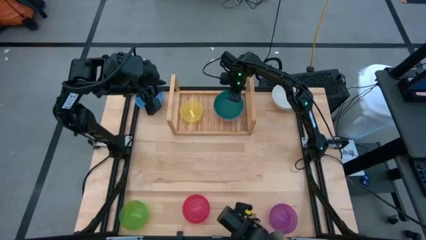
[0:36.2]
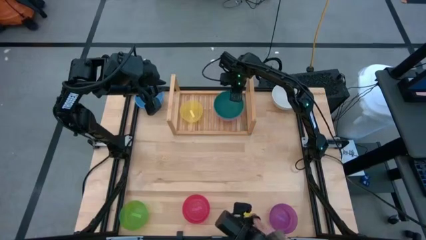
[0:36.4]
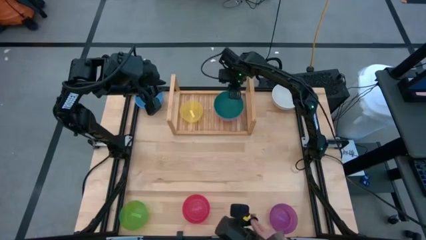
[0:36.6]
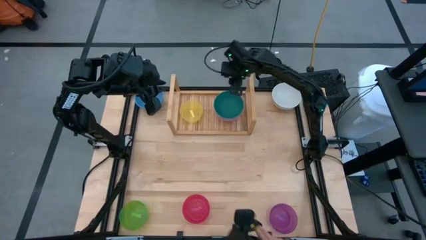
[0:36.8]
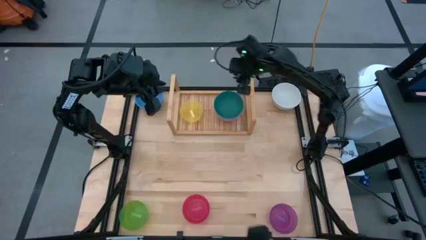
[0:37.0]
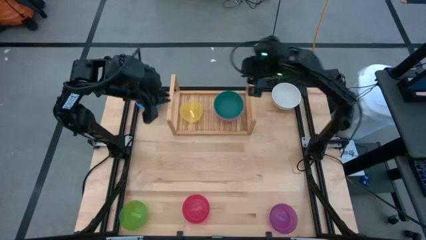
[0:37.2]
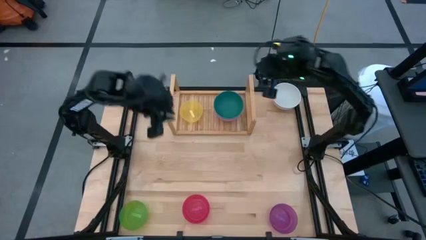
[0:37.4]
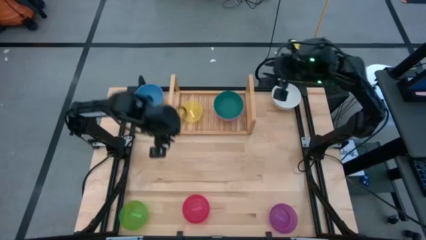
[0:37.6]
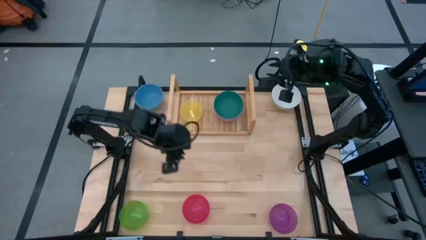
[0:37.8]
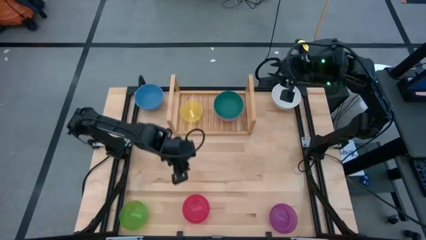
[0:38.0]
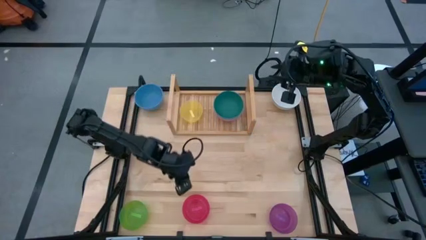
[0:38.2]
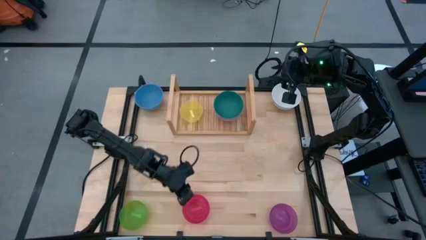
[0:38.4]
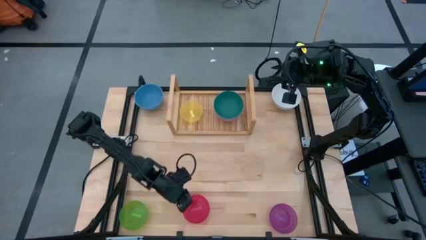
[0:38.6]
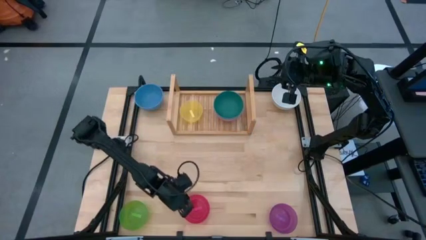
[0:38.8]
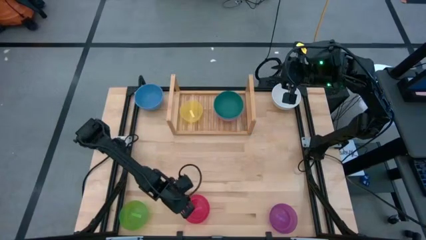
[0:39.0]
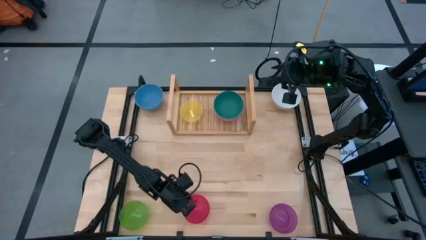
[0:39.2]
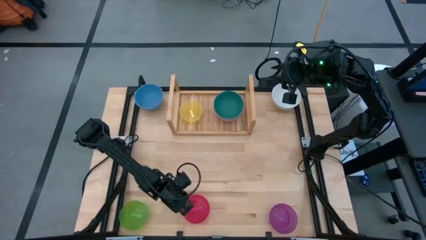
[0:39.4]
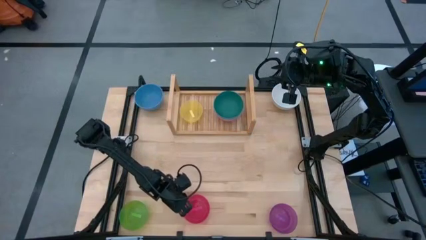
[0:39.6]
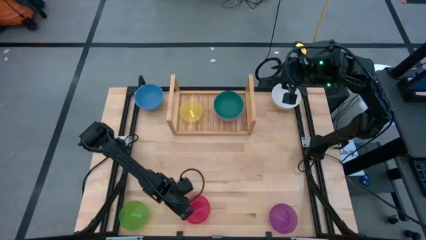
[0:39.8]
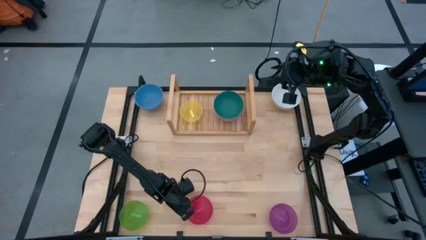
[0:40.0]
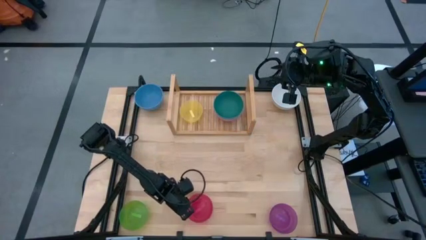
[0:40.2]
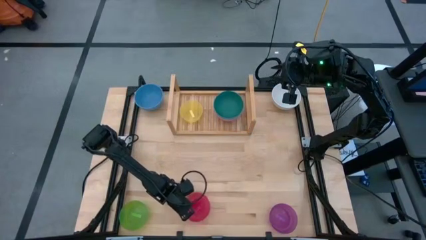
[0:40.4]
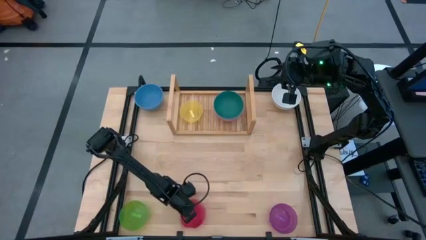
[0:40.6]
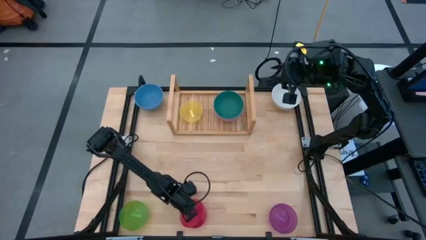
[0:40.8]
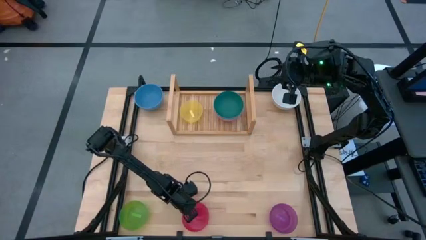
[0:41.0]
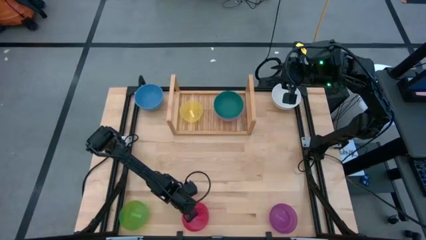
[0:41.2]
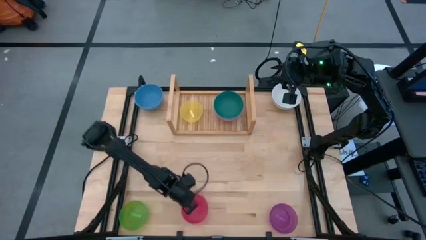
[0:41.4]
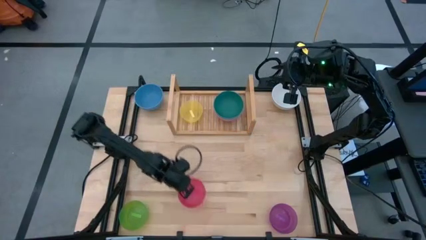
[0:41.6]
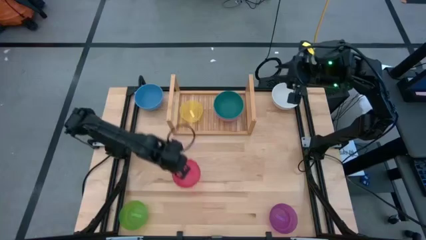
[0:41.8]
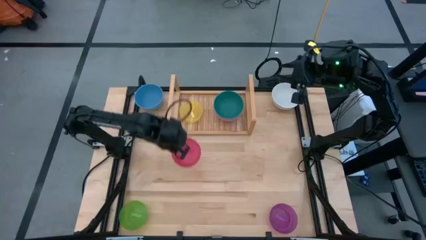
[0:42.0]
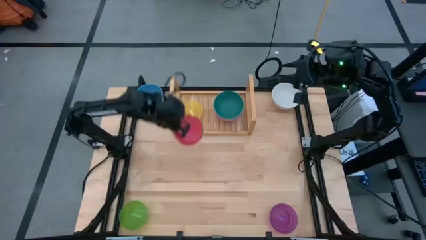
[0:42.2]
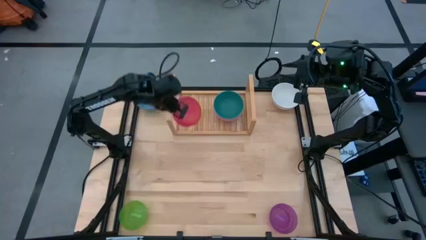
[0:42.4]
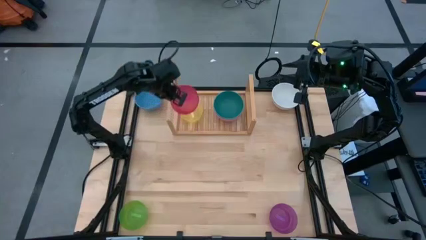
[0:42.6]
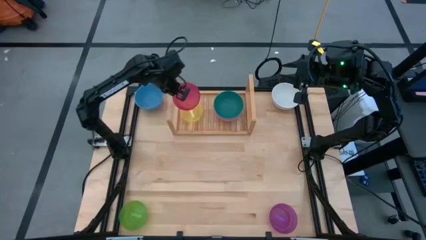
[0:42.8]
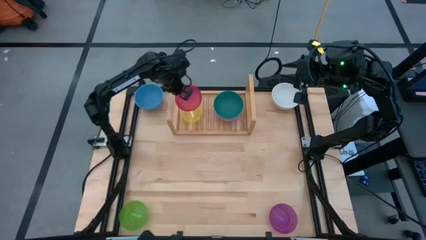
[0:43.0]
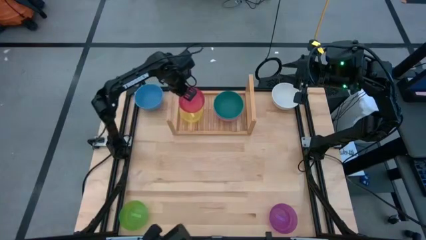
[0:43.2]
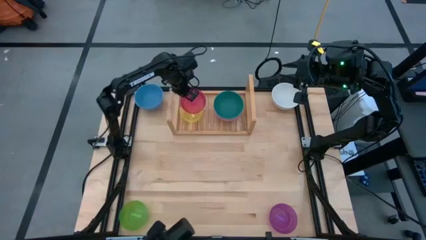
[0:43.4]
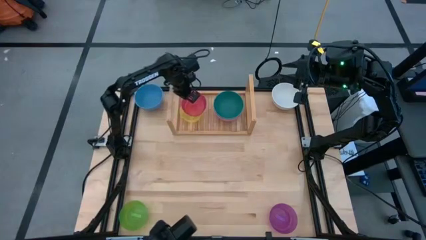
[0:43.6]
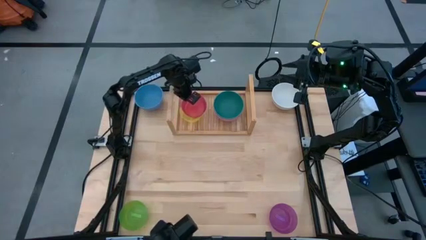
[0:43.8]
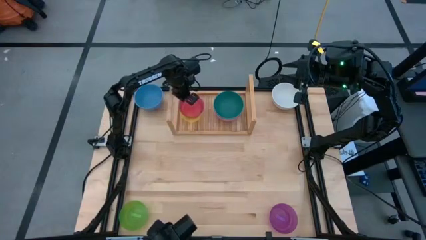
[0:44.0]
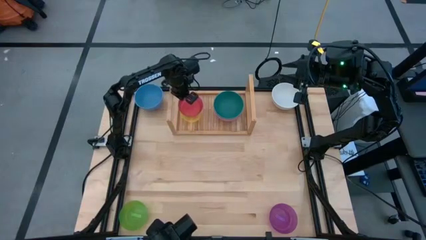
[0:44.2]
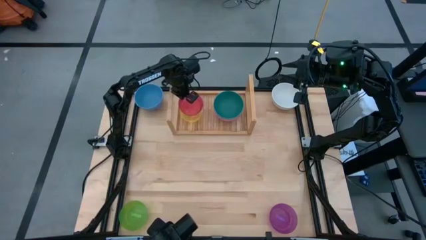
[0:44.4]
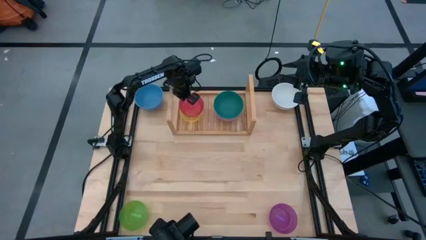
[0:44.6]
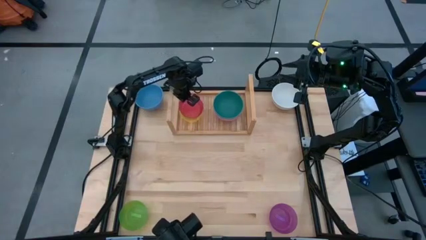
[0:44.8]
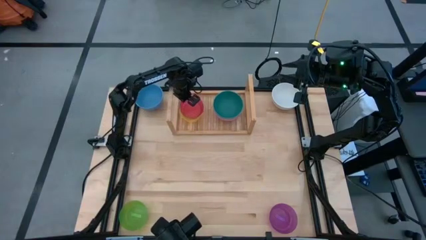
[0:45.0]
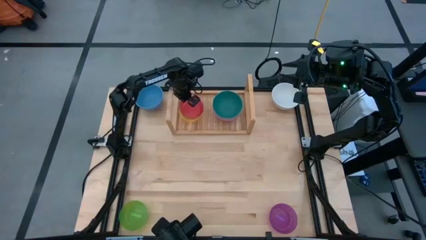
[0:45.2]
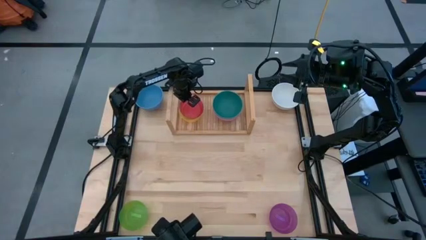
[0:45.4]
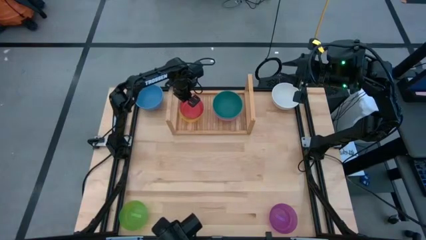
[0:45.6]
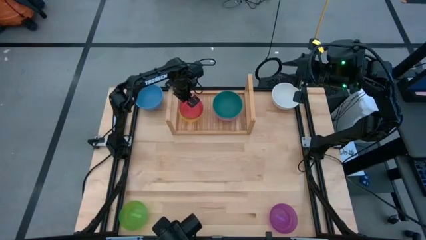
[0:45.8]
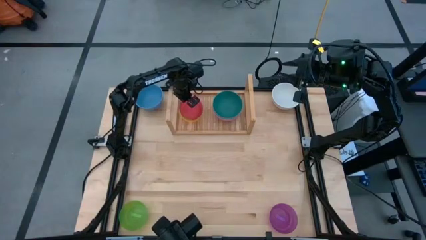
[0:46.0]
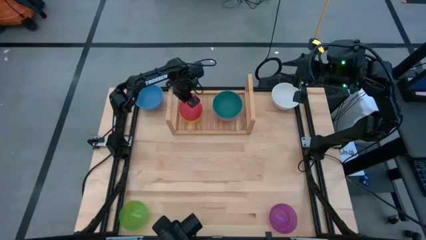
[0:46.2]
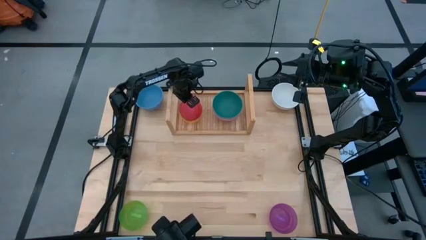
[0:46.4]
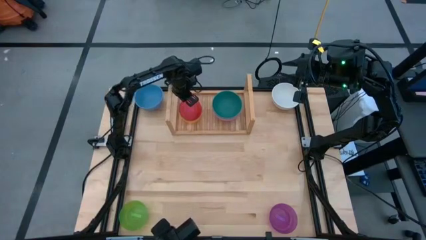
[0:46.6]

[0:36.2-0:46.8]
Task: Place and stack bowls onto a shelf
Stack the red bowl onto the yellow bowl
